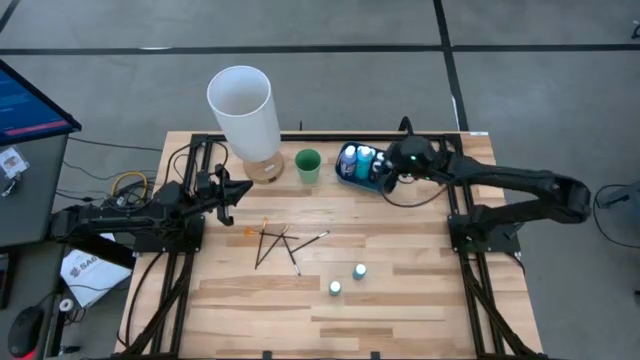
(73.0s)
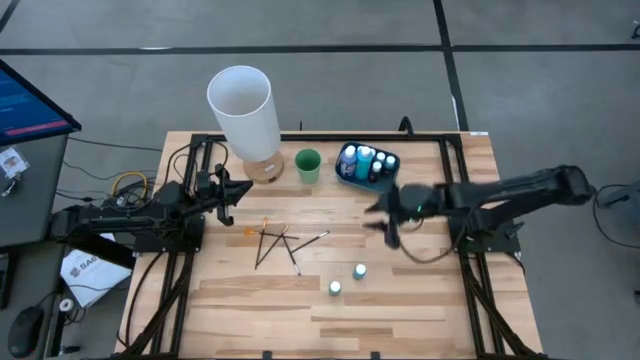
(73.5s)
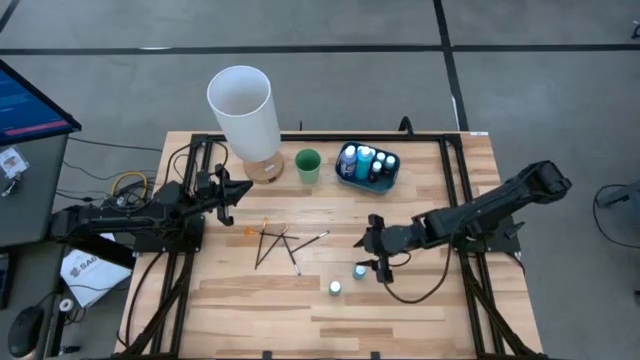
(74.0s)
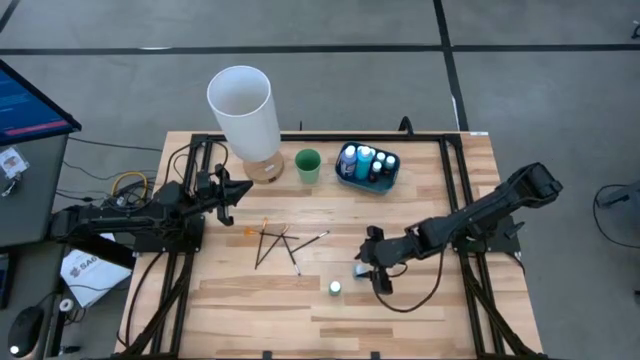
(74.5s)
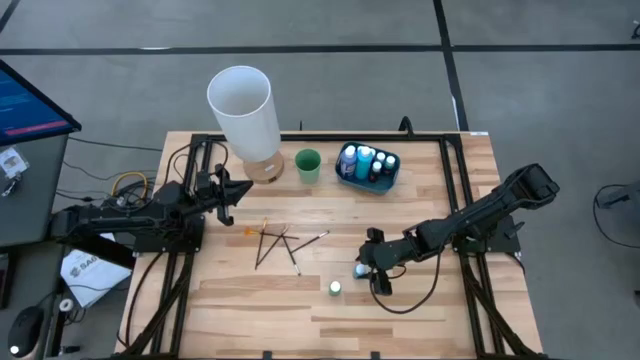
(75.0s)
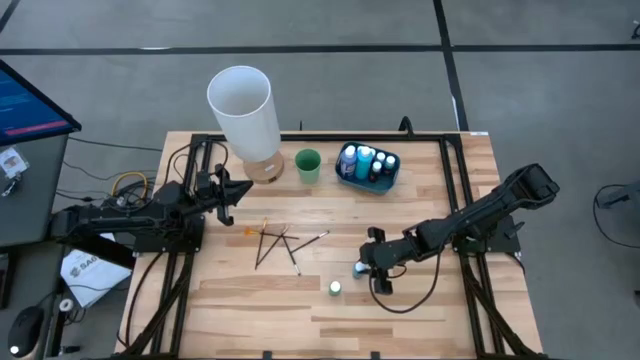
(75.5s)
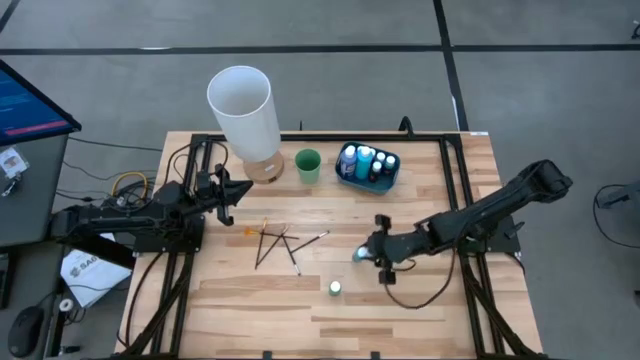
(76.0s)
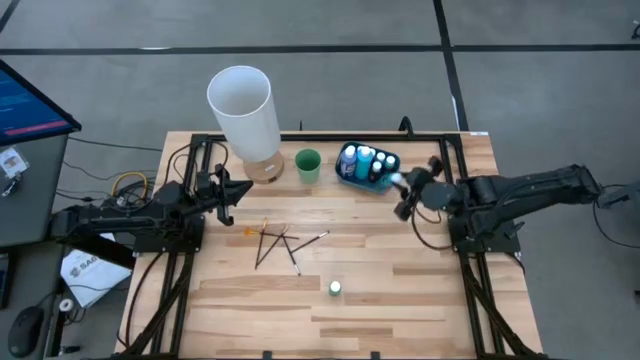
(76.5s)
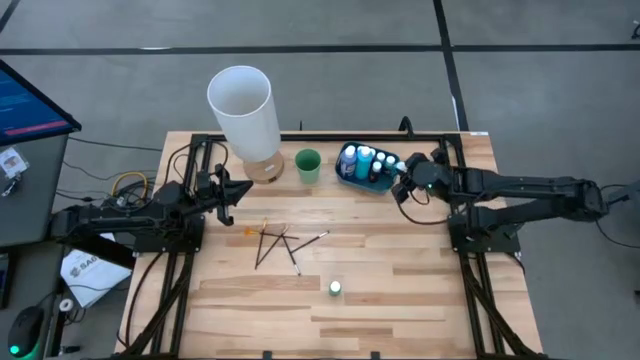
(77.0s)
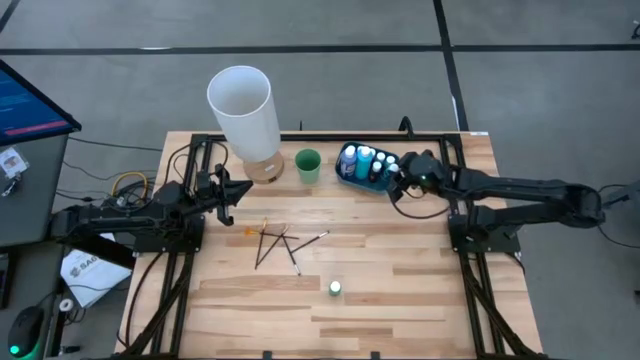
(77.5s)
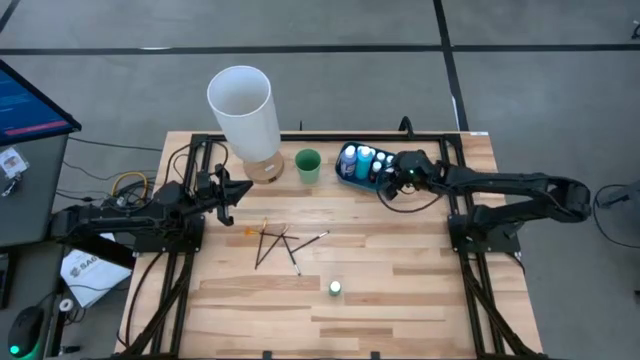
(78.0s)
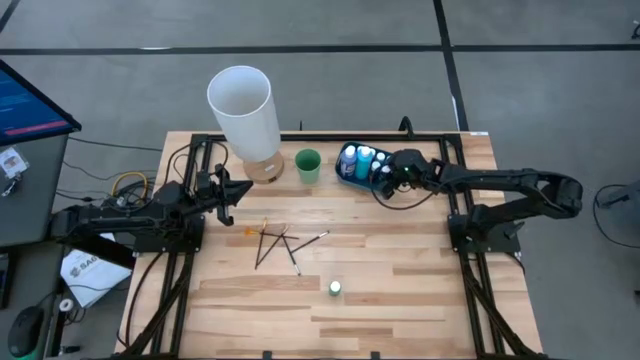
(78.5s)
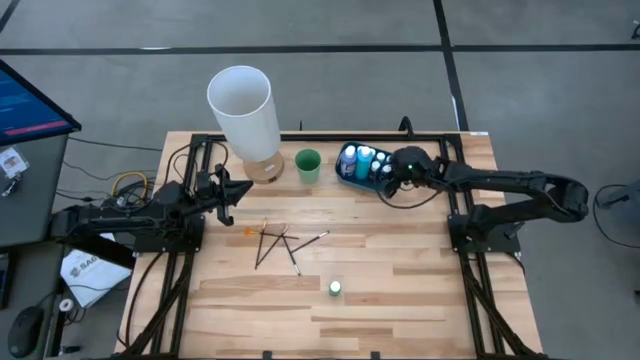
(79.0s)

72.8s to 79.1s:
Task: Pick & Place Paint Supplies
Put the small light green paint bottle into the blue bin

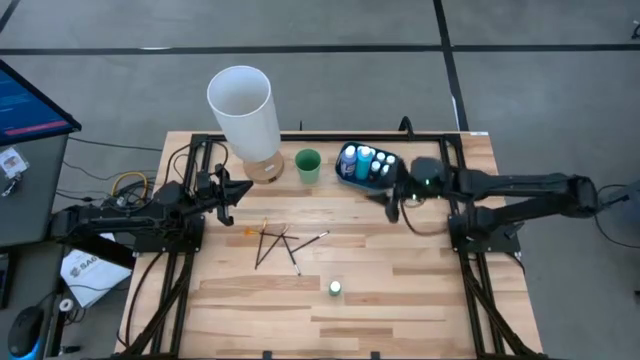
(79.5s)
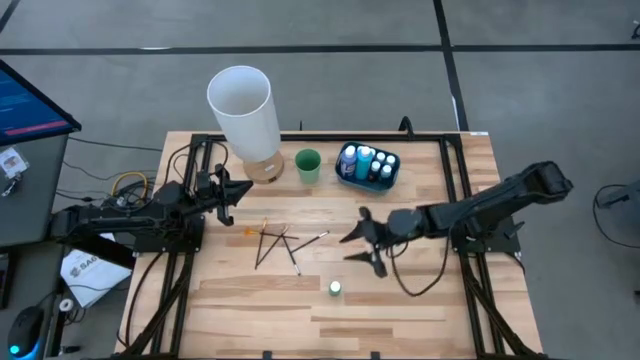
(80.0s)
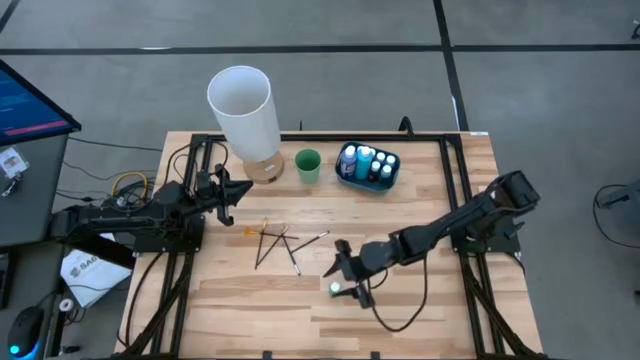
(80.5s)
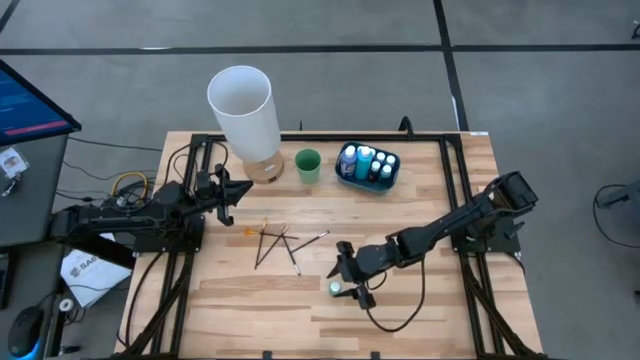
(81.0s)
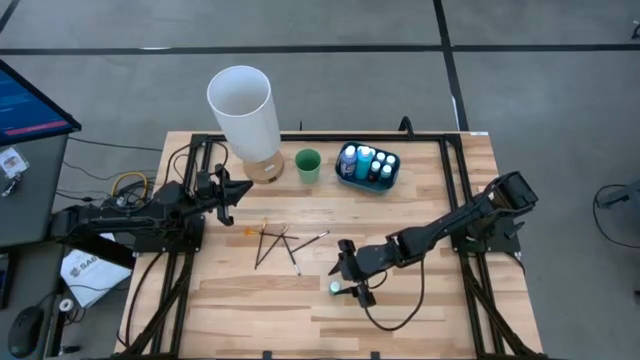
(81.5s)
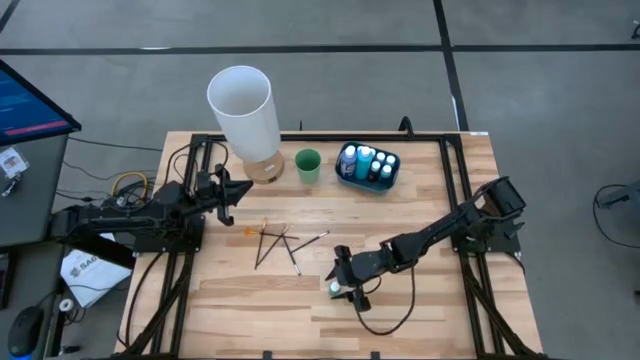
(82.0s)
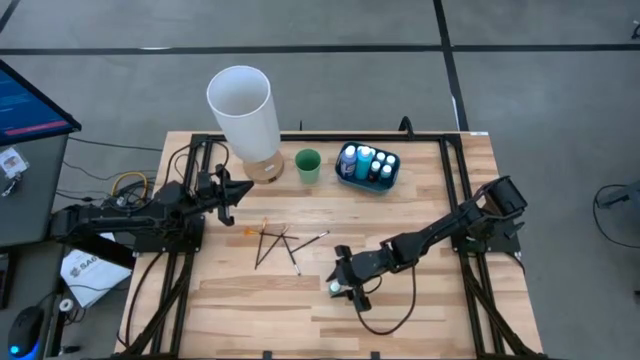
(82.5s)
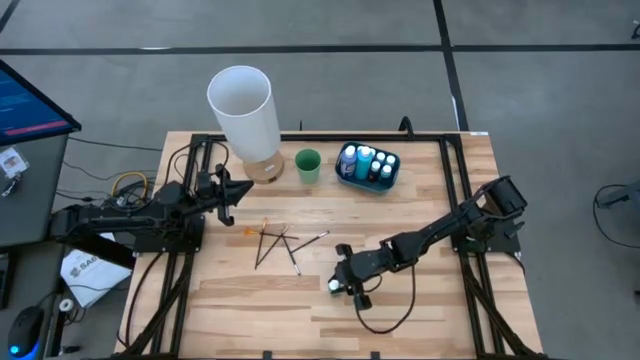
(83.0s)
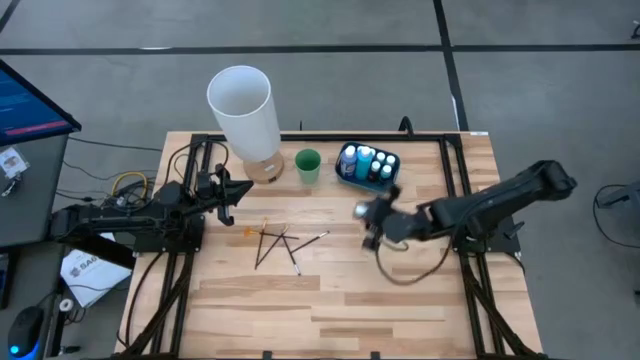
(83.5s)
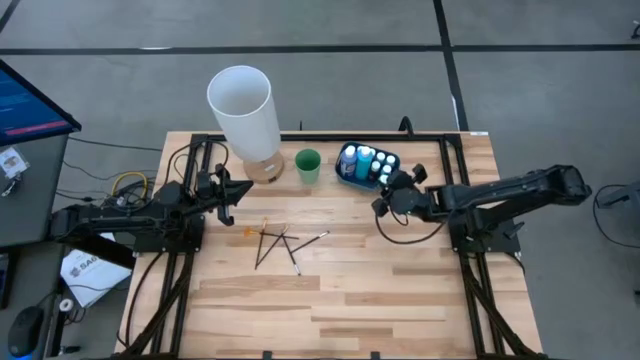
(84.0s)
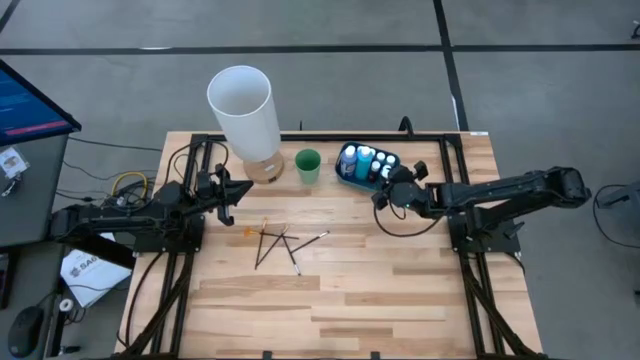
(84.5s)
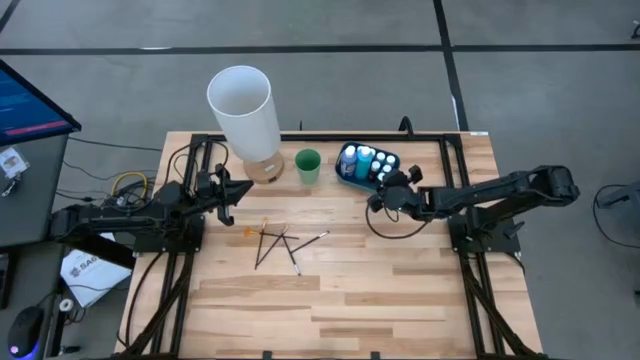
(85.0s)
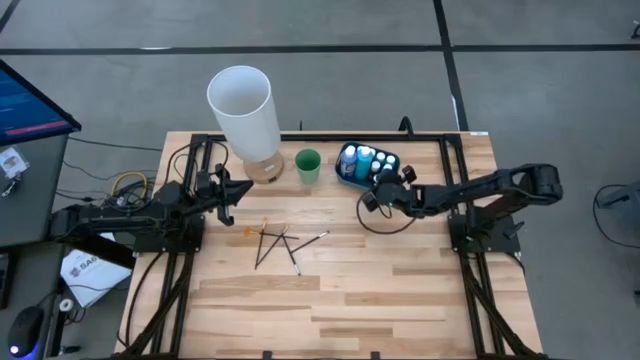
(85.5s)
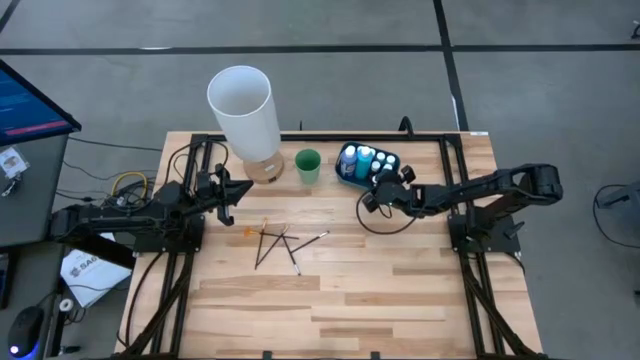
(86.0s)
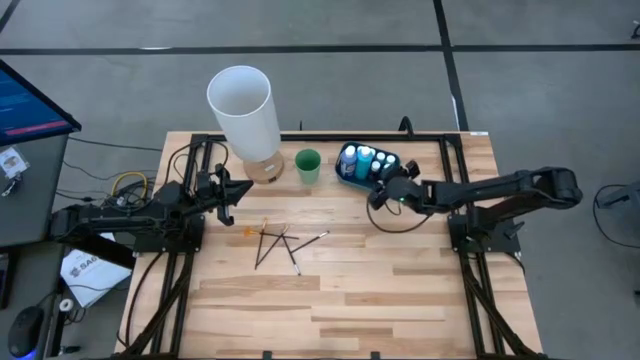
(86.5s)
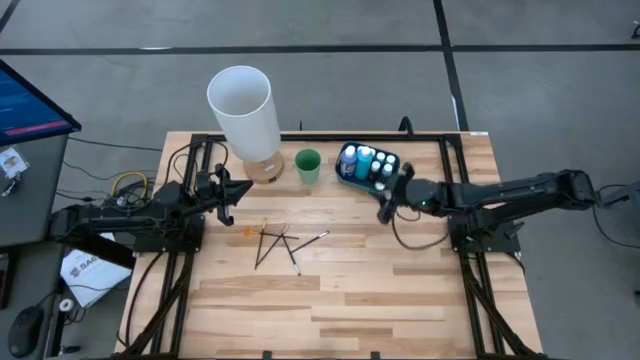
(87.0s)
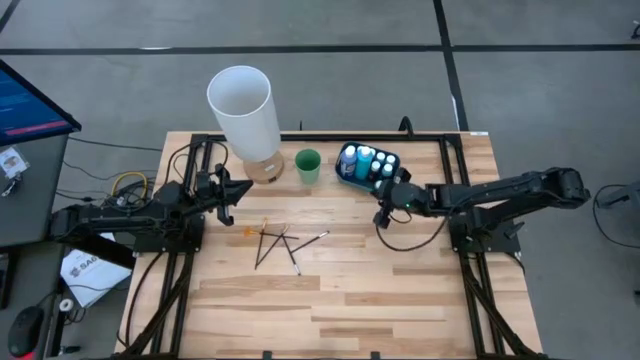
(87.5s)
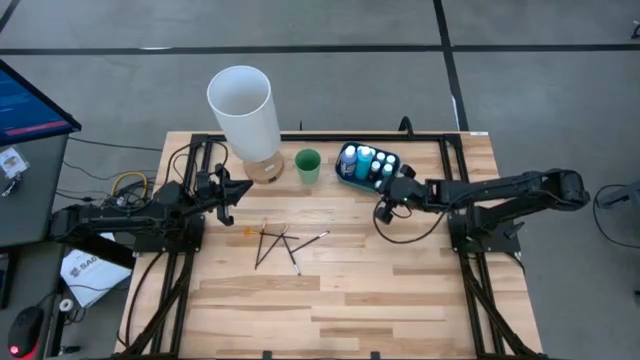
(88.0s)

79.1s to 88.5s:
Put the green paint bottle into the blue bin

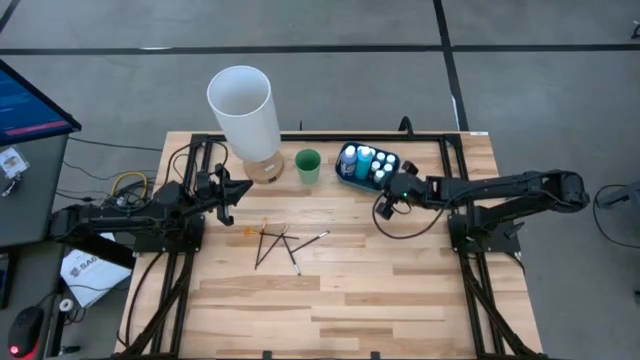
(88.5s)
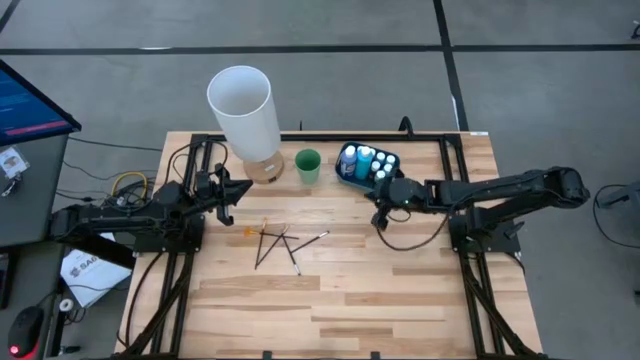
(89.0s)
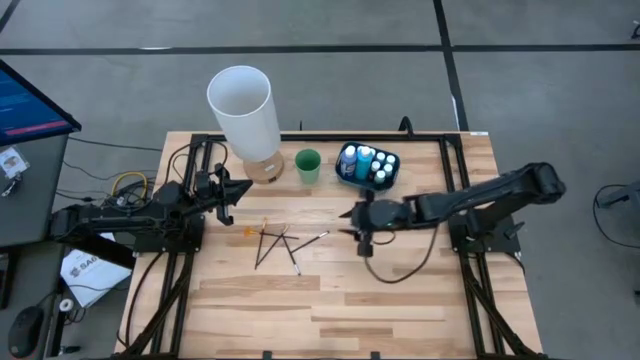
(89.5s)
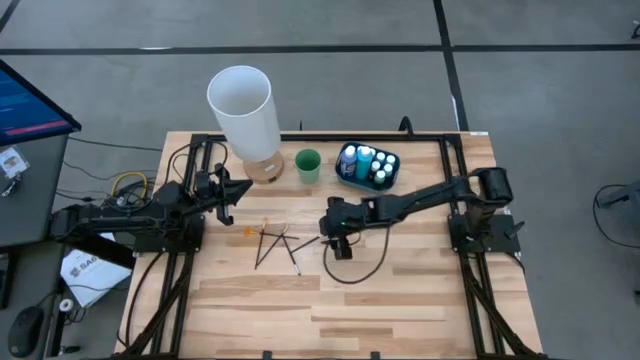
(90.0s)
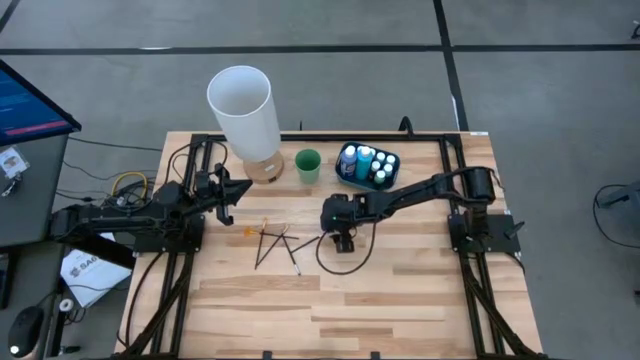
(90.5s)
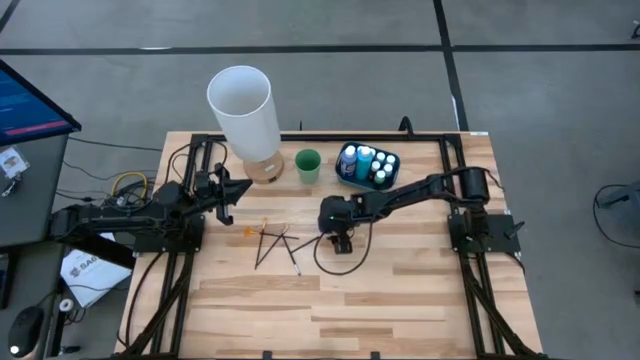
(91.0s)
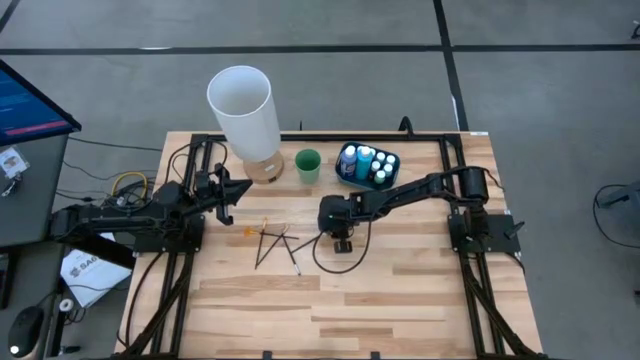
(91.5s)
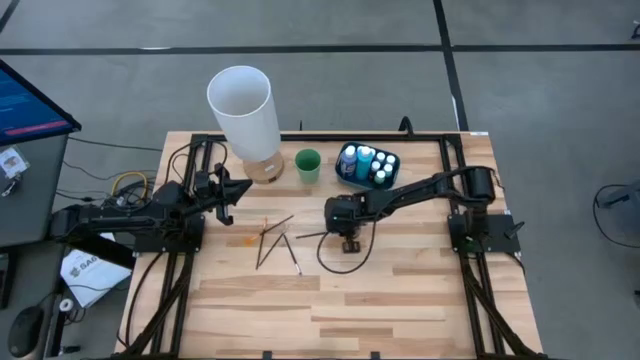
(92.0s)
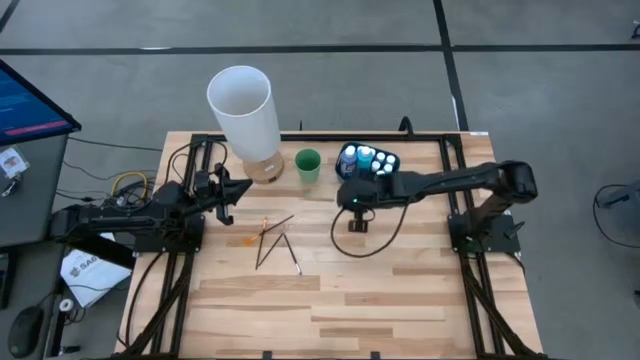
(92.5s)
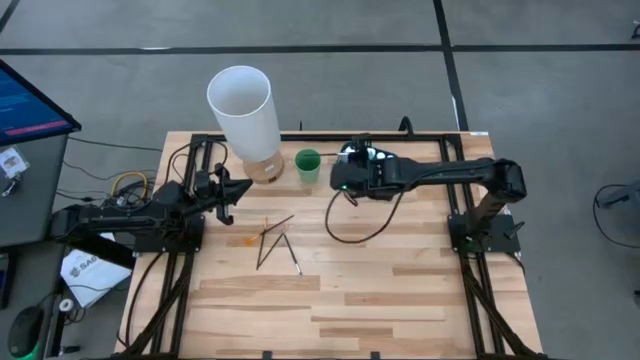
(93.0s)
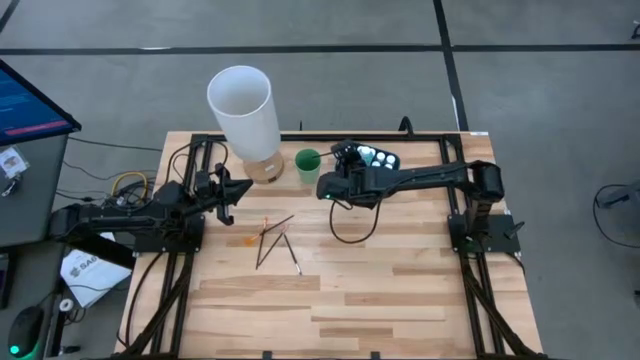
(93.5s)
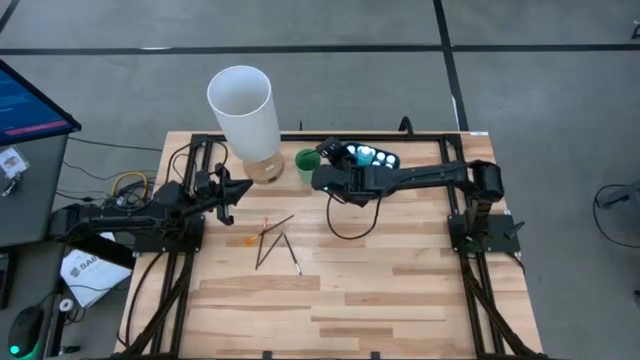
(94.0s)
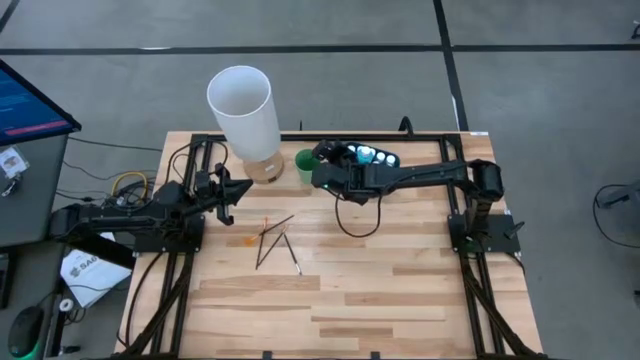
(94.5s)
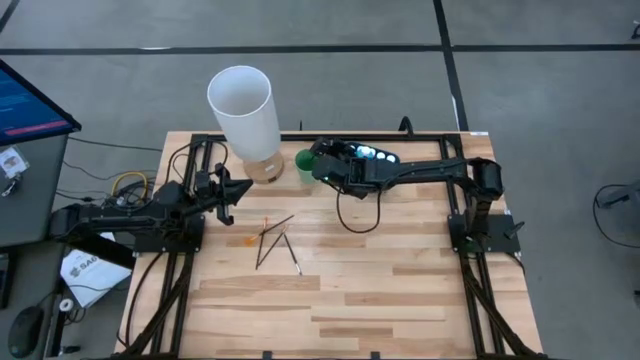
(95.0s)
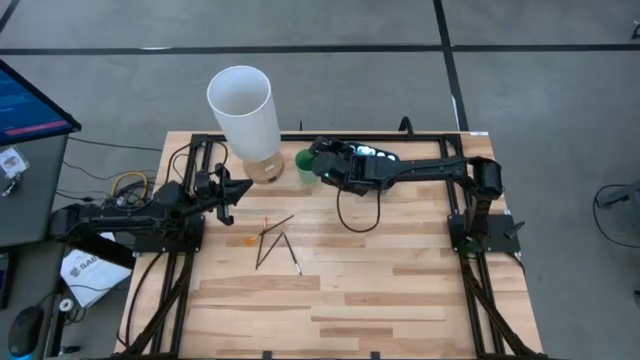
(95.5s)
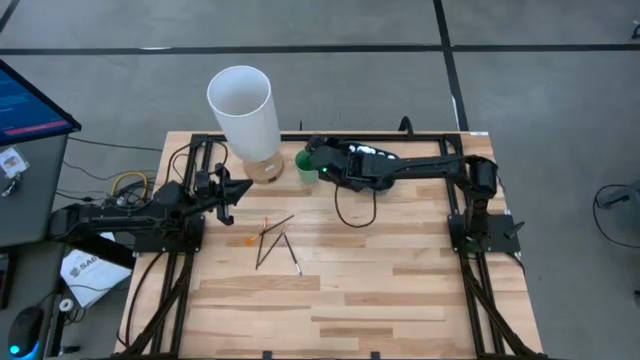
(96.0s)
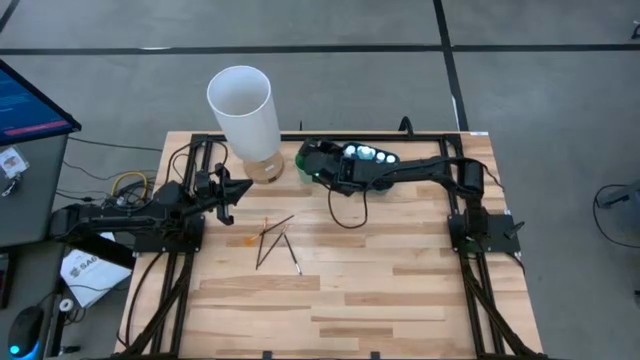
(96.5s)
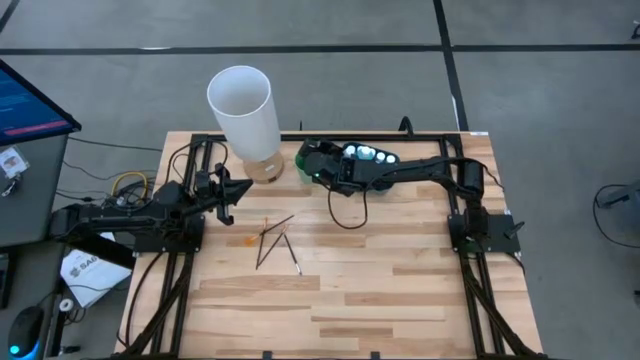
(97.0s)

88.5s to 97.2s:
Put the right silver paint brush into the green cup
